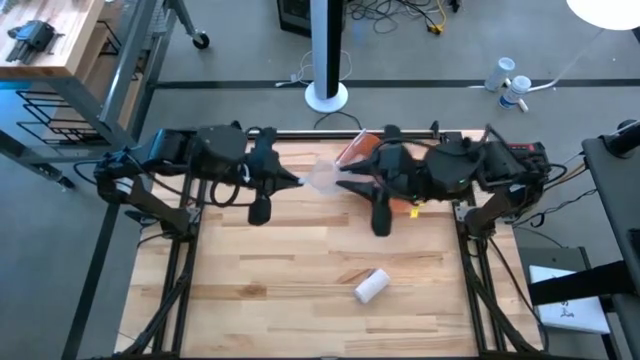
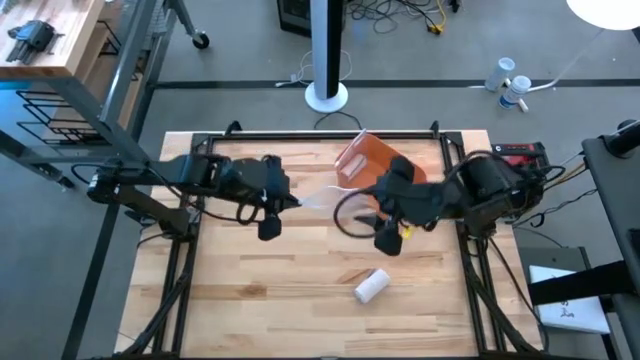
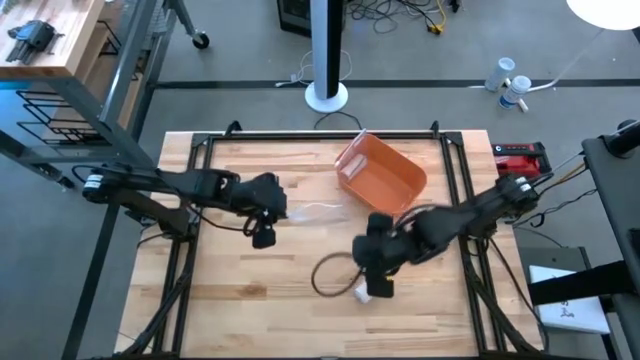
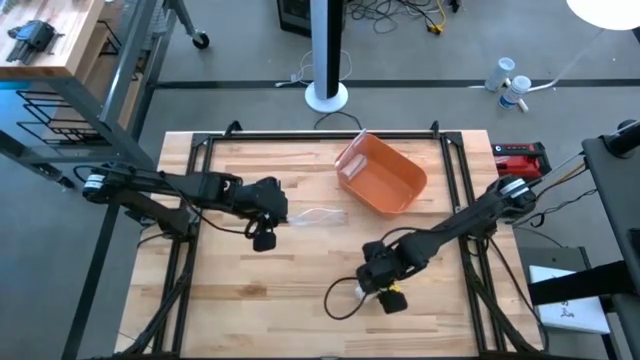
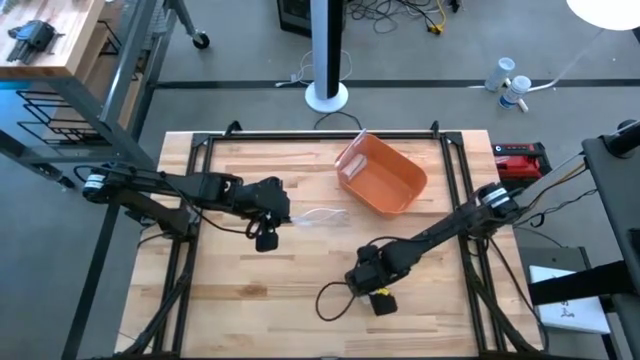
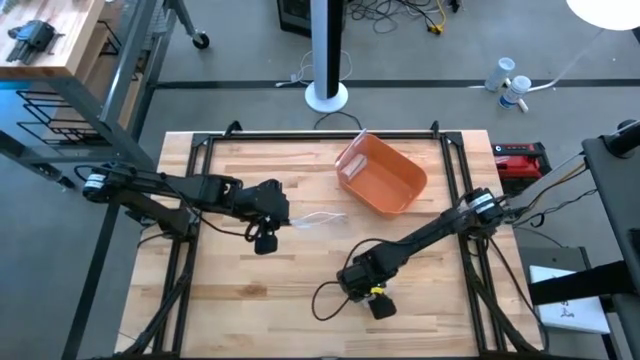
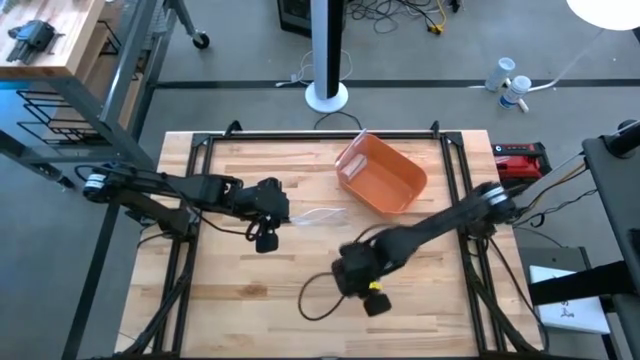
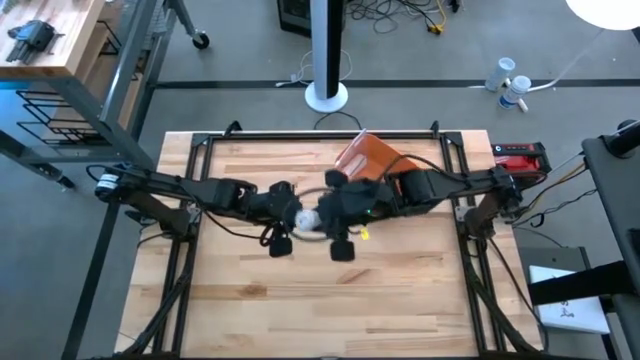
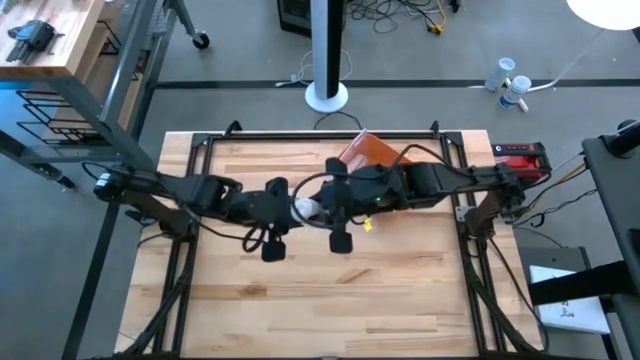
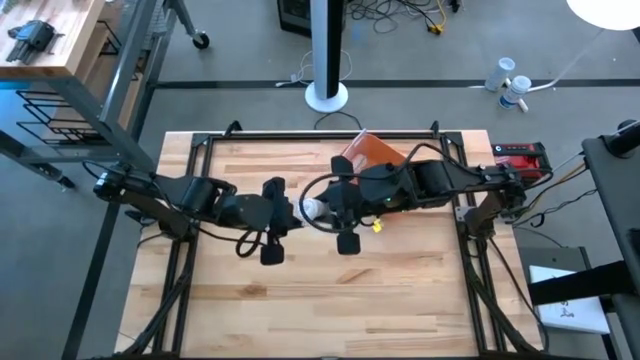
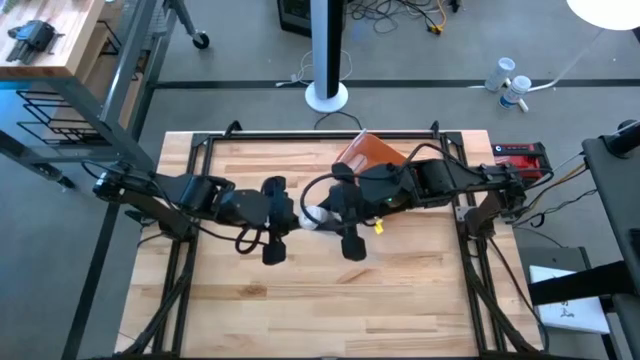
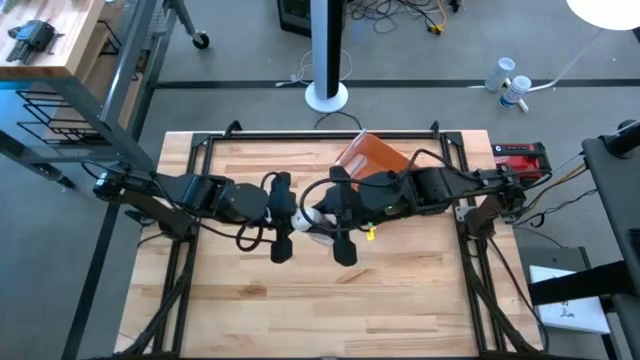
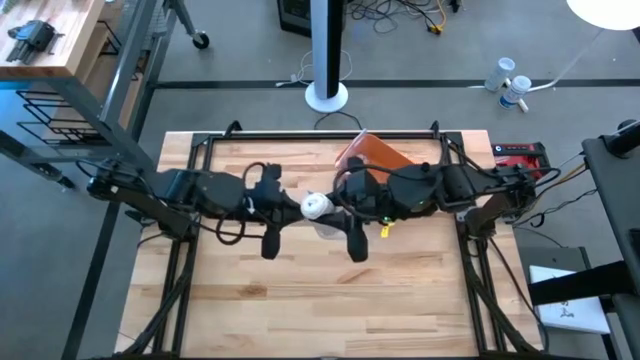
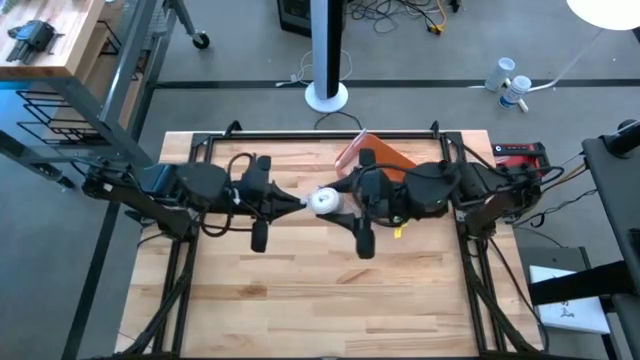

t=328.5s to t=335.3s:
Task: Roll bandage
Put the rolled brown bandage into the transparent zip bag

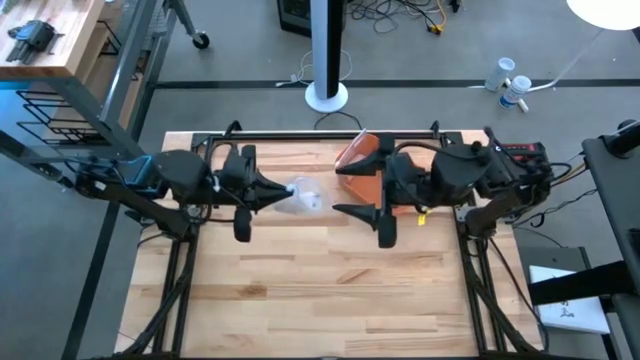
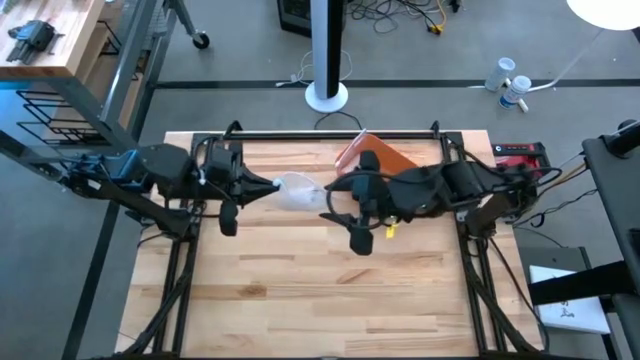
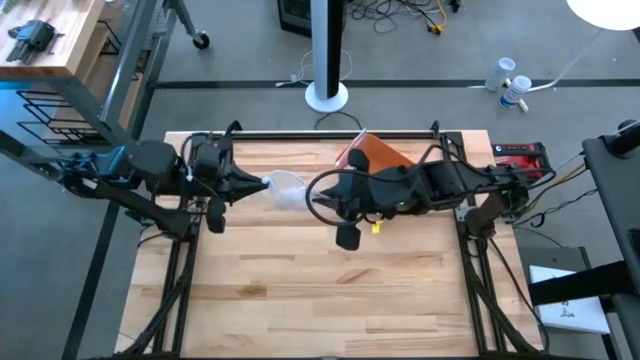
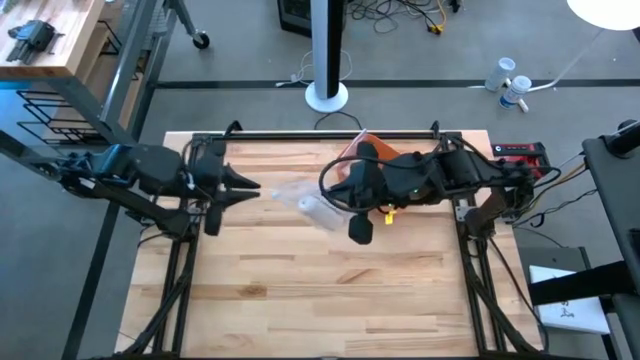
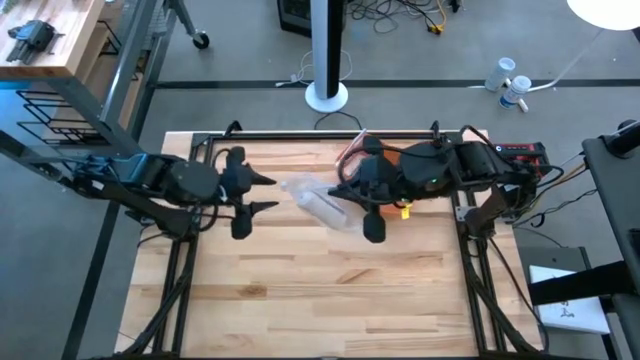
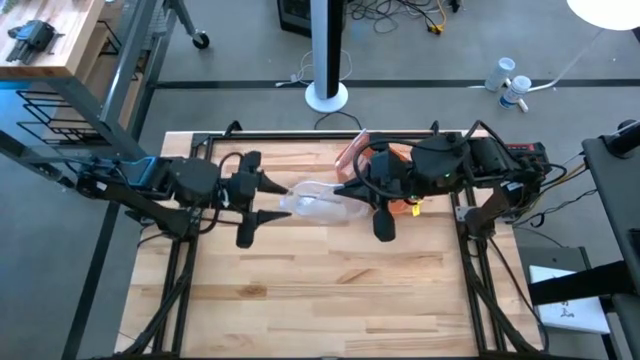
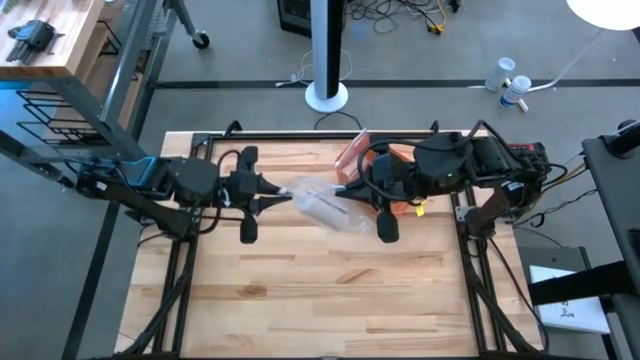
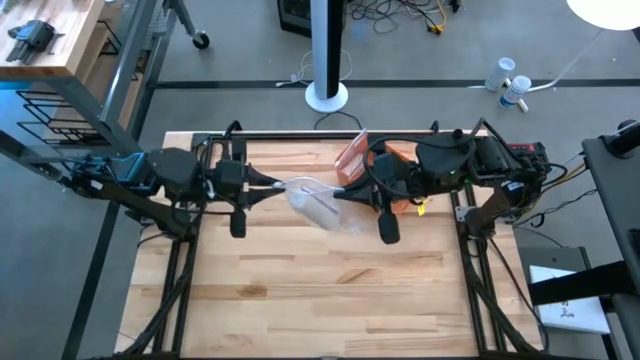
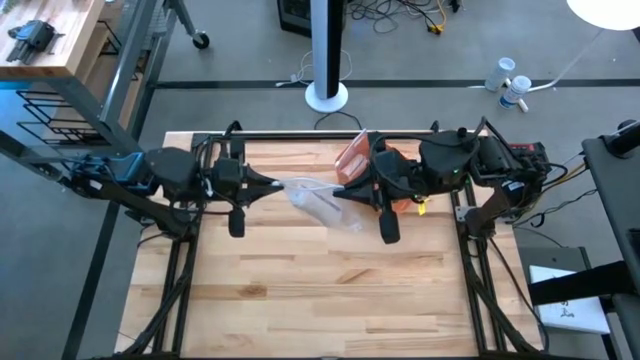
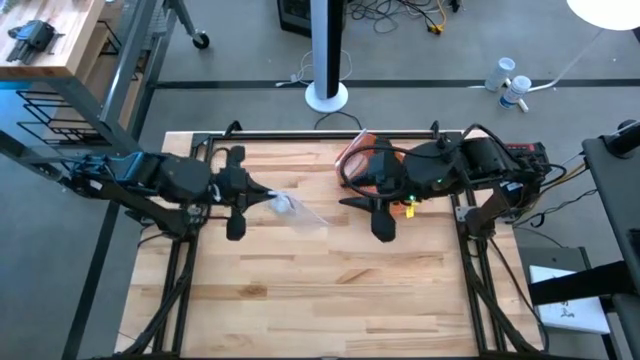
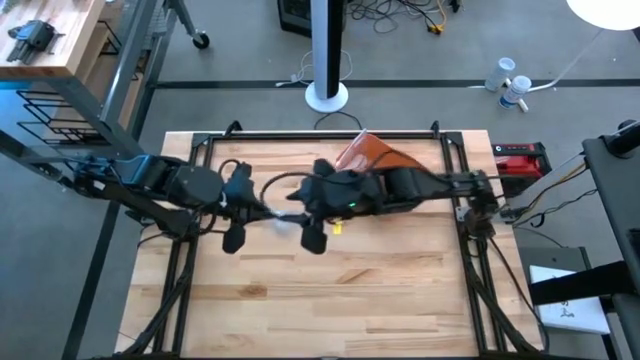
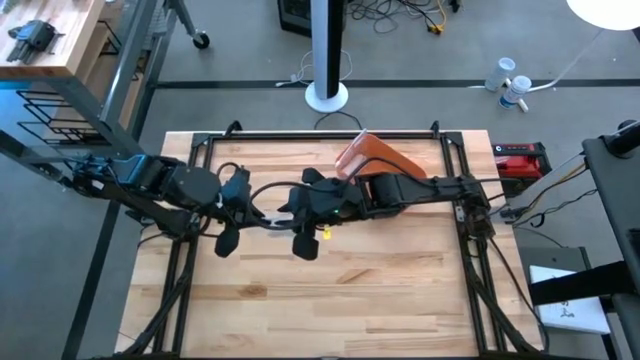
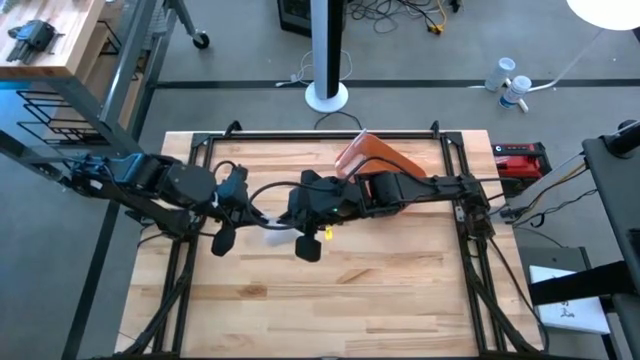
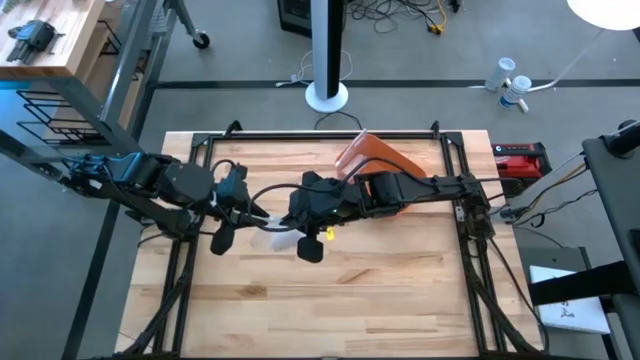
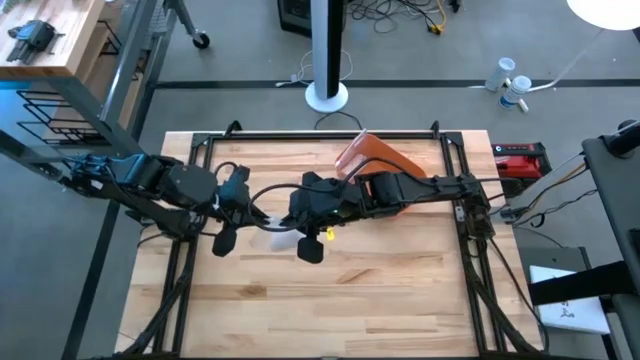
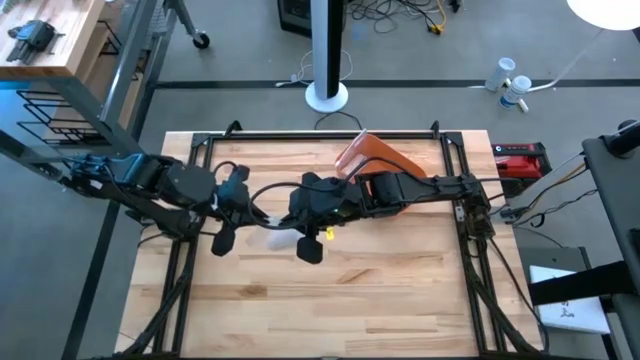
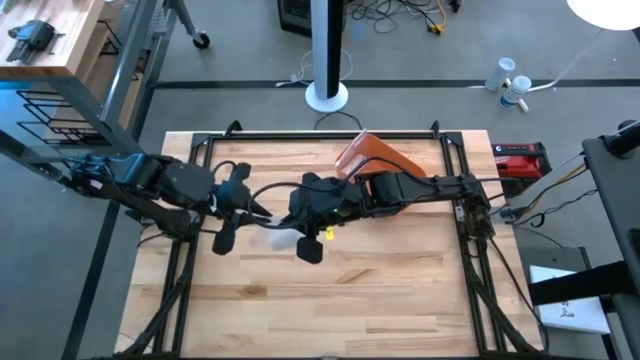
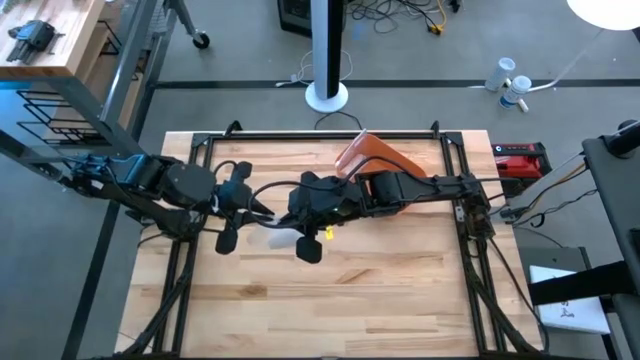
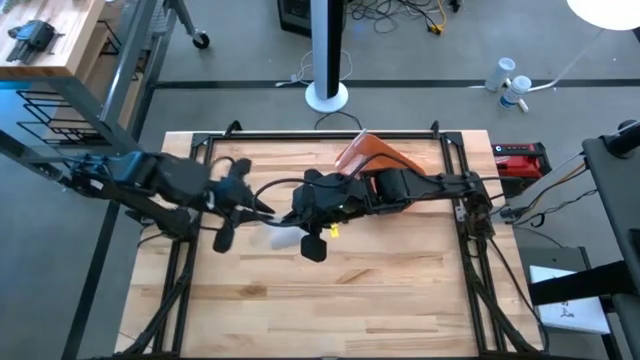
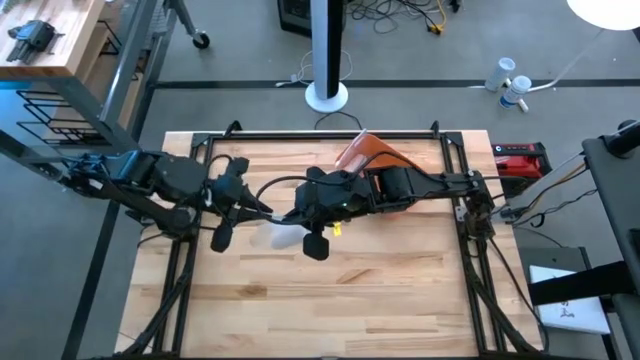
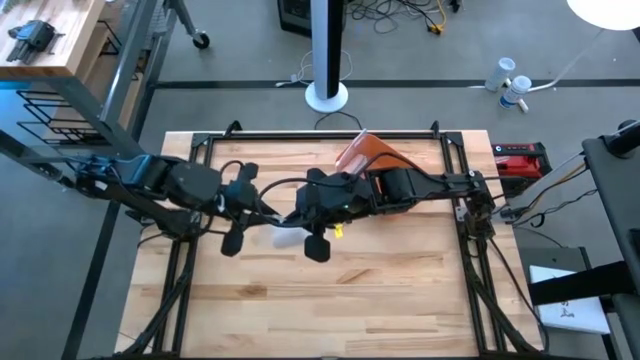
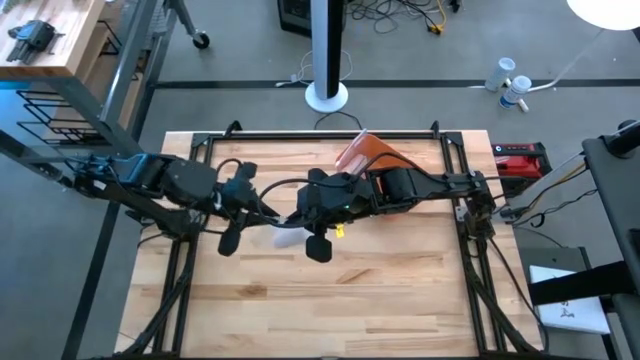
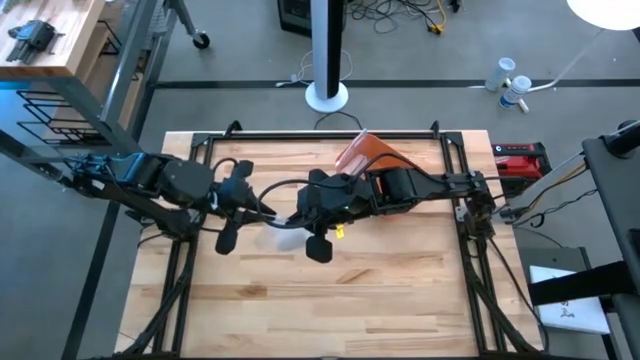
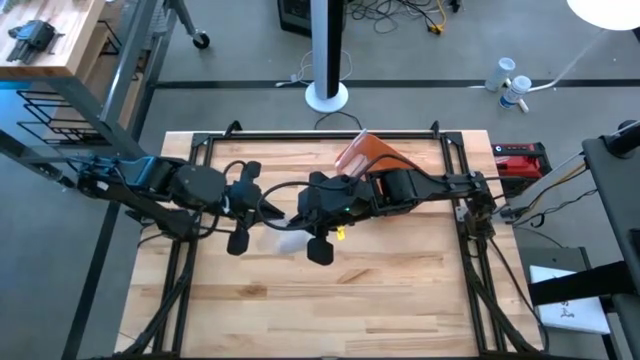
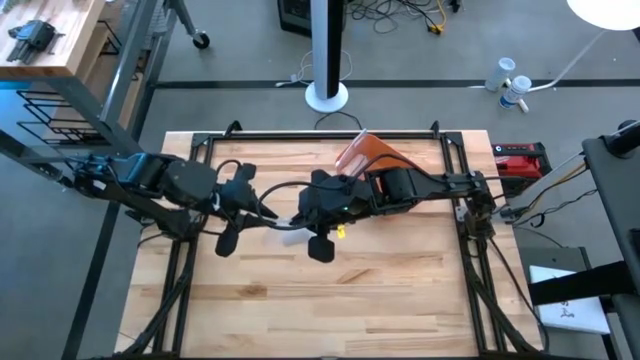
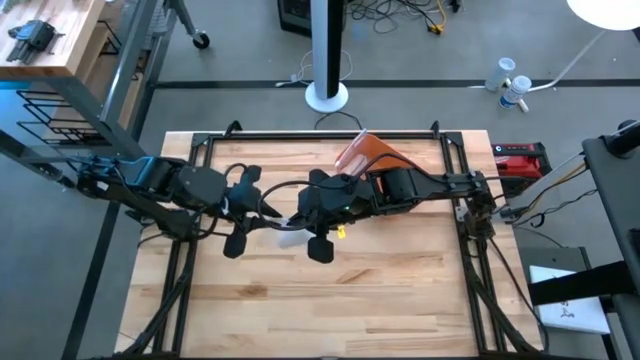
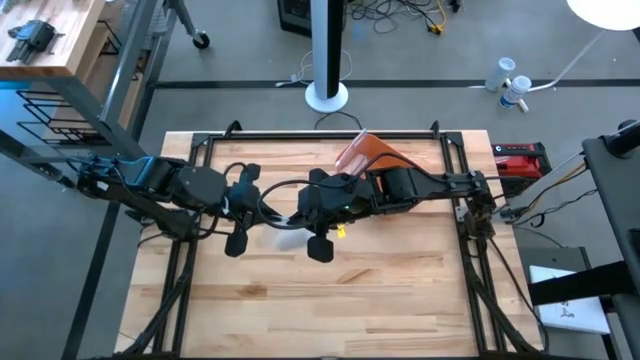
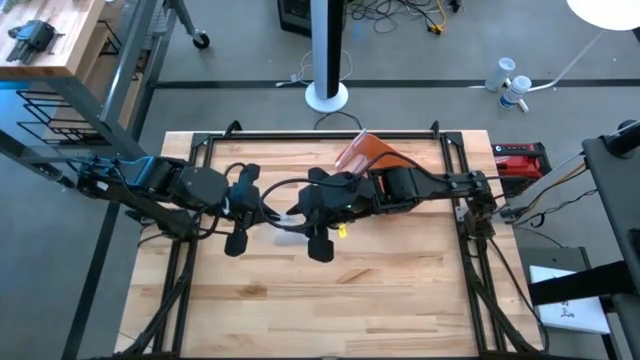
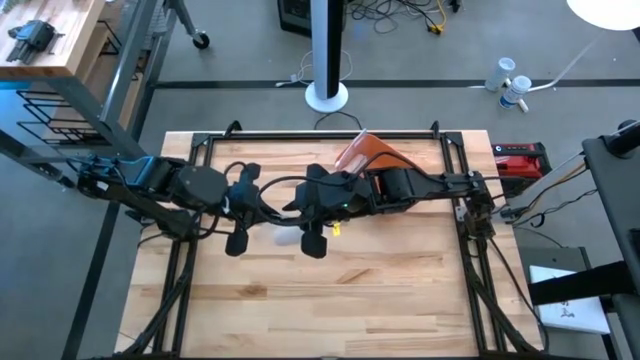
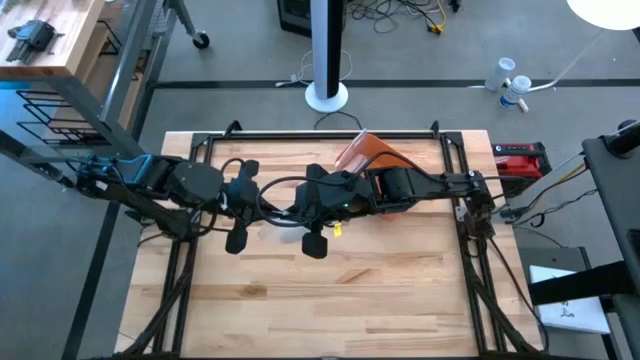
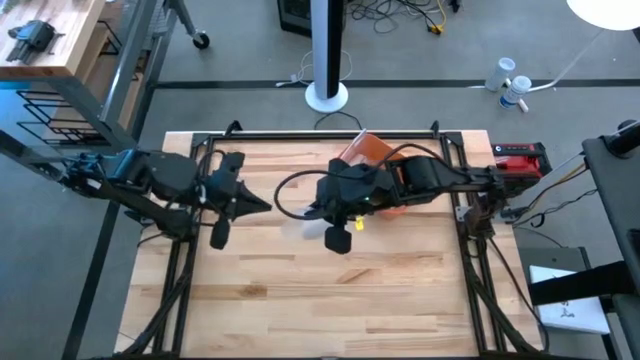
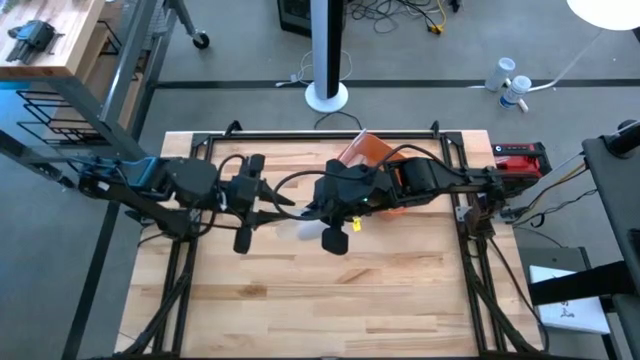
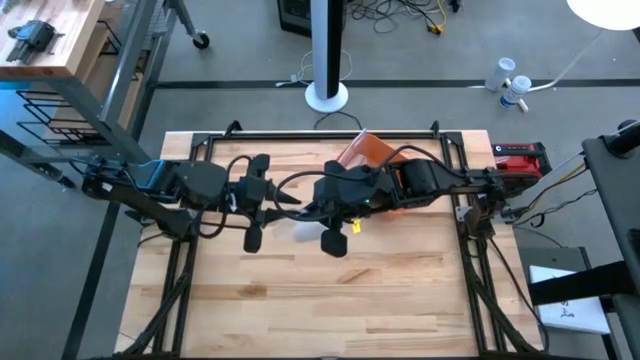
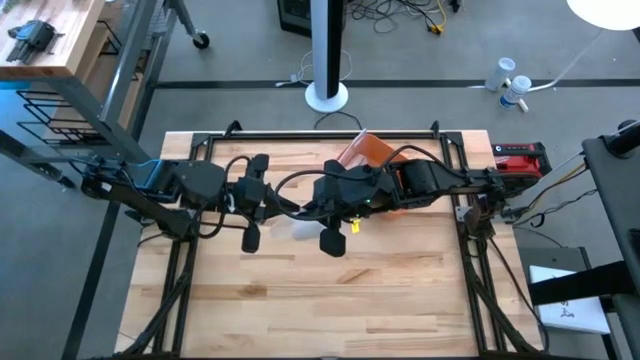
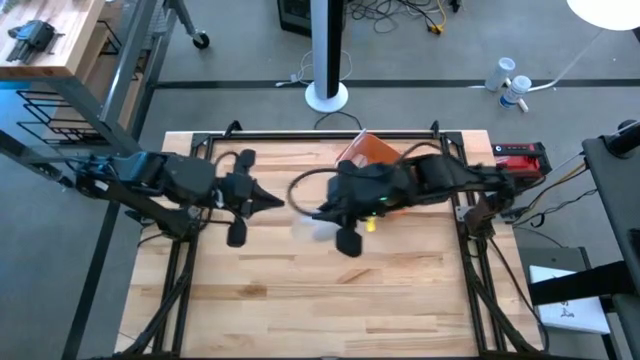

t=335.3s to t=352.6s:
Close the transparent zip bag
